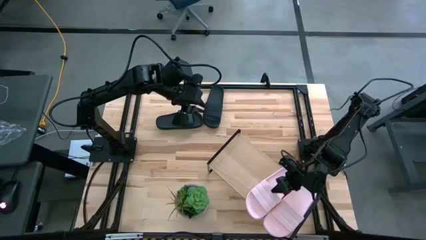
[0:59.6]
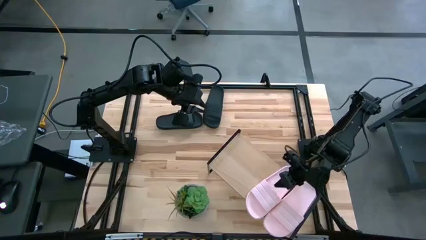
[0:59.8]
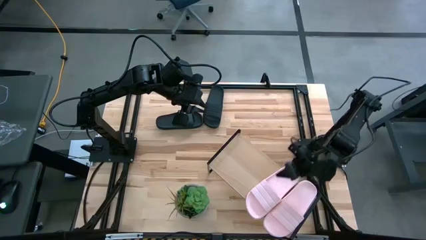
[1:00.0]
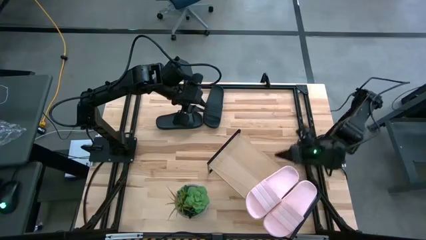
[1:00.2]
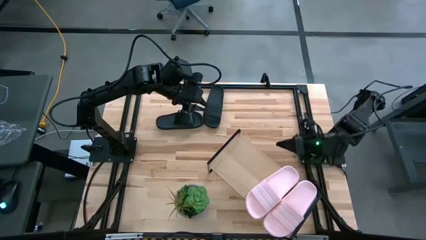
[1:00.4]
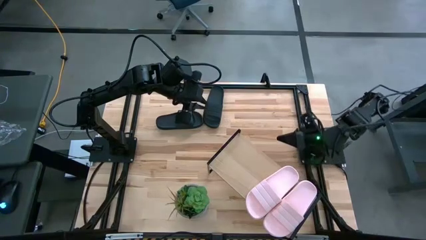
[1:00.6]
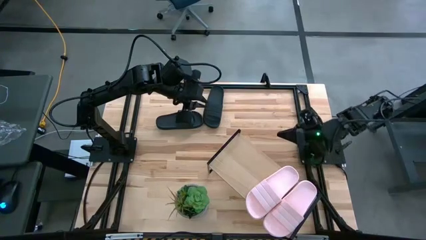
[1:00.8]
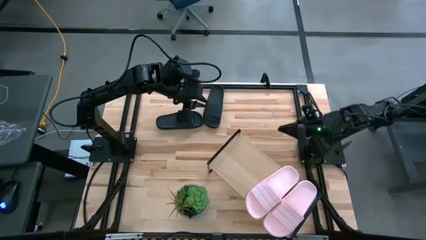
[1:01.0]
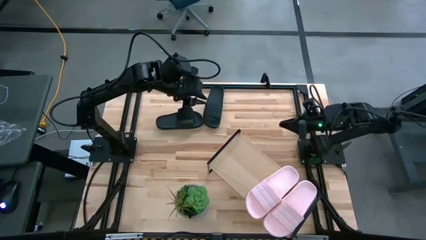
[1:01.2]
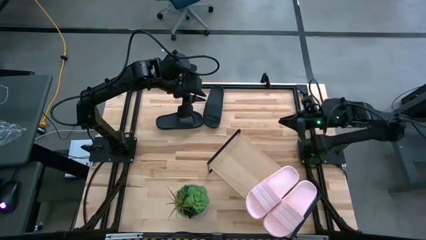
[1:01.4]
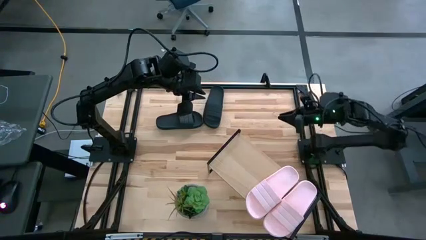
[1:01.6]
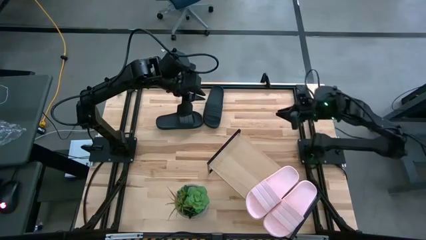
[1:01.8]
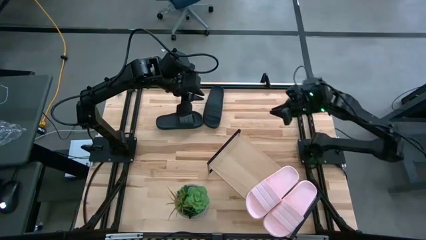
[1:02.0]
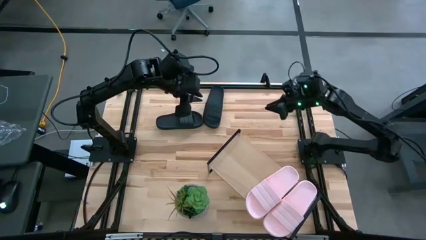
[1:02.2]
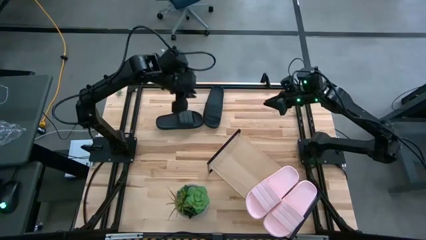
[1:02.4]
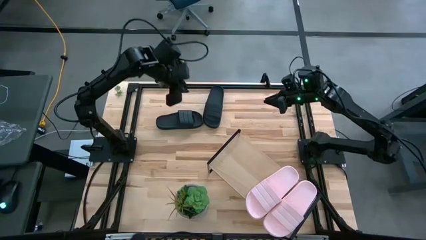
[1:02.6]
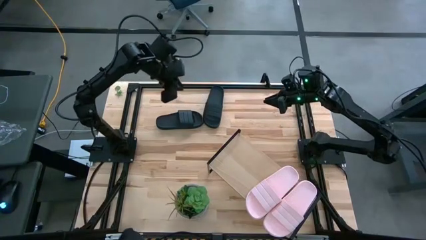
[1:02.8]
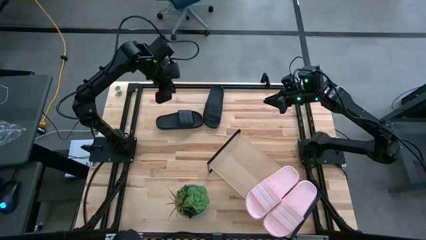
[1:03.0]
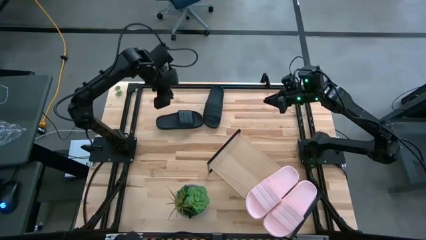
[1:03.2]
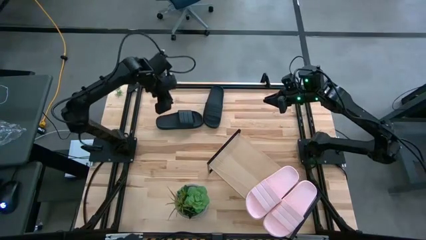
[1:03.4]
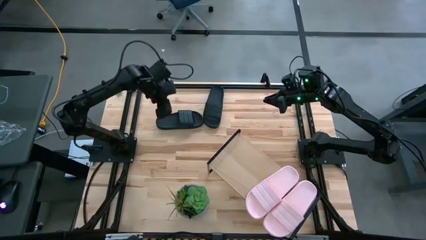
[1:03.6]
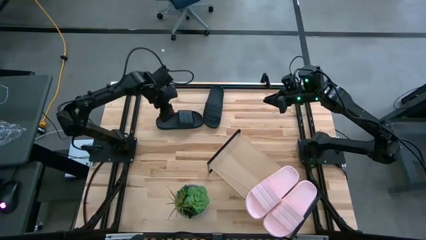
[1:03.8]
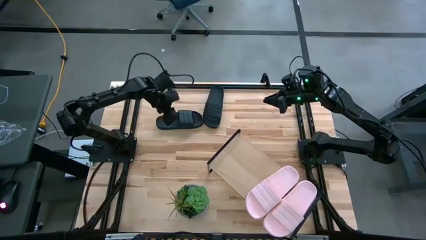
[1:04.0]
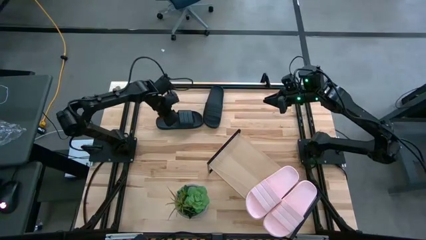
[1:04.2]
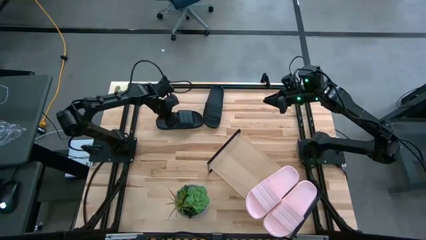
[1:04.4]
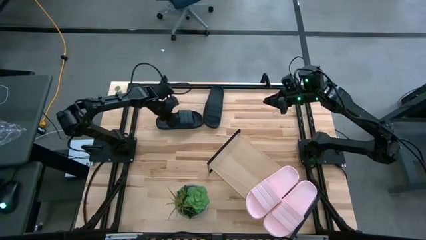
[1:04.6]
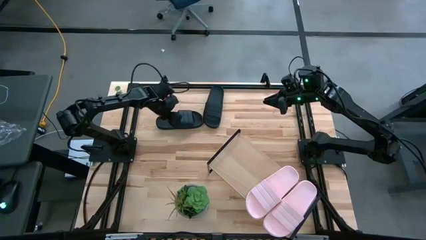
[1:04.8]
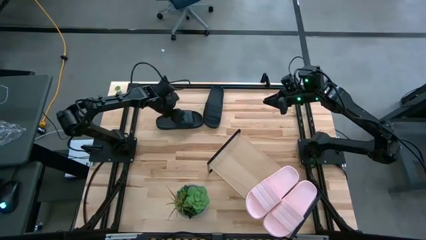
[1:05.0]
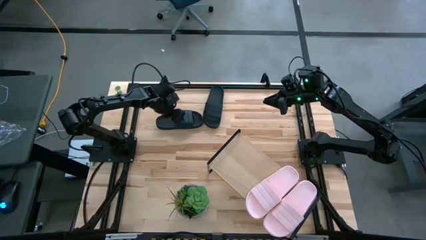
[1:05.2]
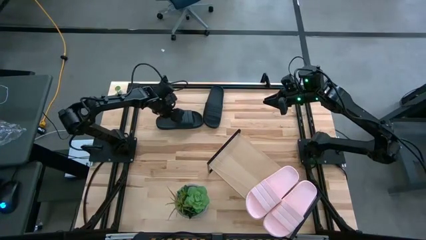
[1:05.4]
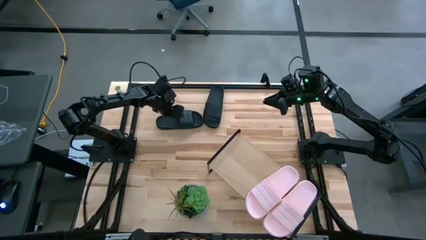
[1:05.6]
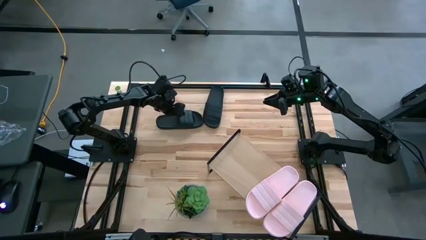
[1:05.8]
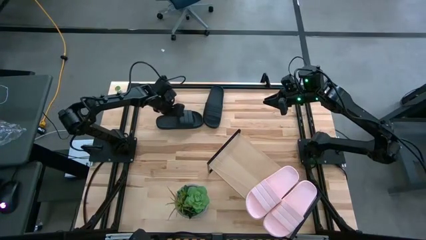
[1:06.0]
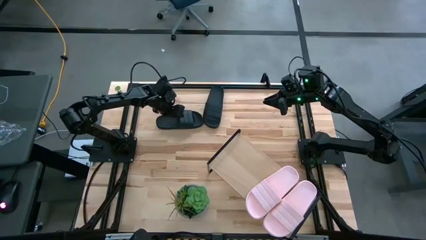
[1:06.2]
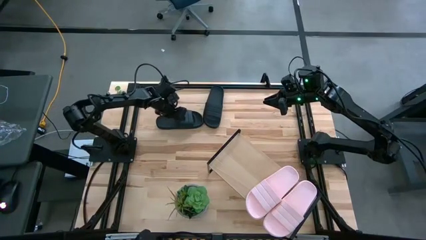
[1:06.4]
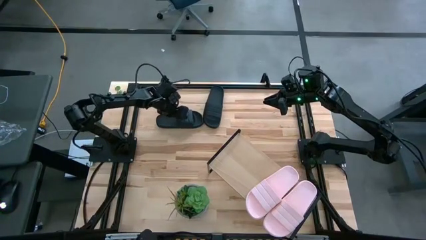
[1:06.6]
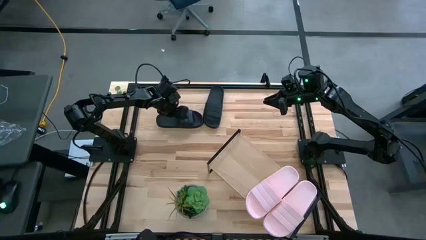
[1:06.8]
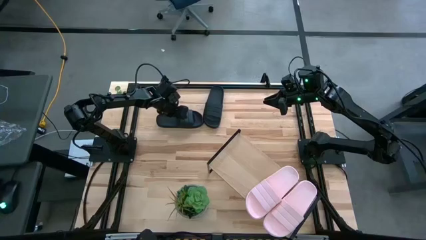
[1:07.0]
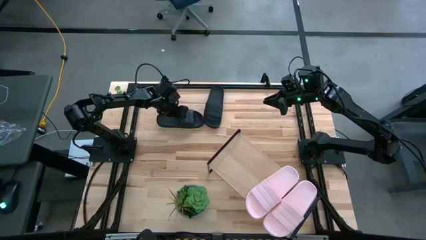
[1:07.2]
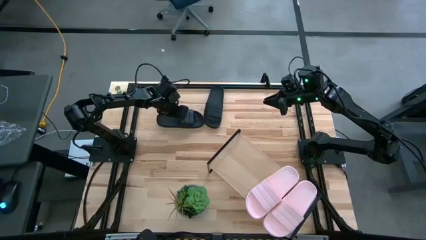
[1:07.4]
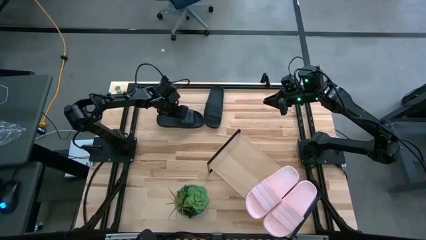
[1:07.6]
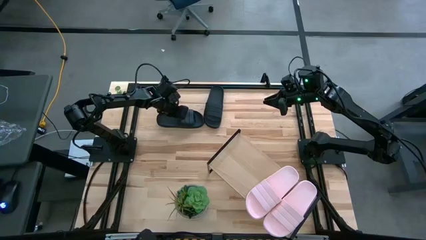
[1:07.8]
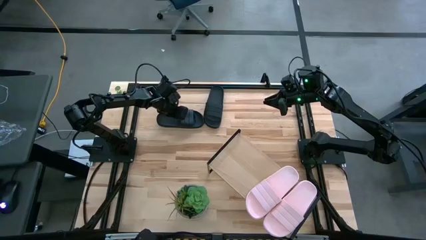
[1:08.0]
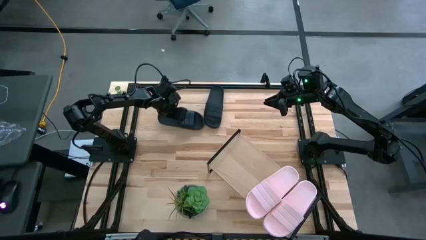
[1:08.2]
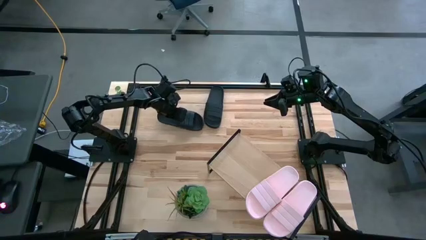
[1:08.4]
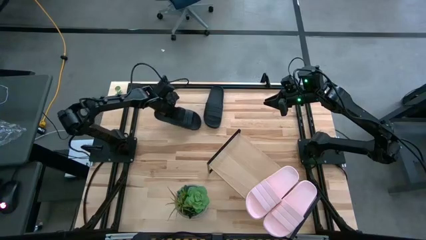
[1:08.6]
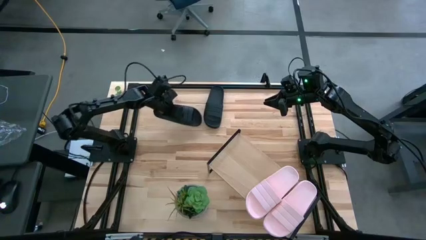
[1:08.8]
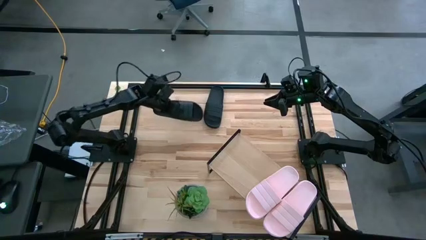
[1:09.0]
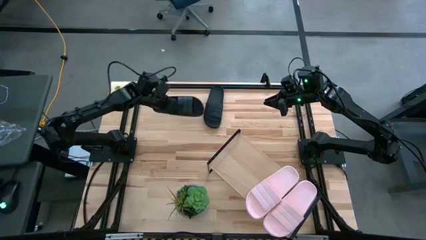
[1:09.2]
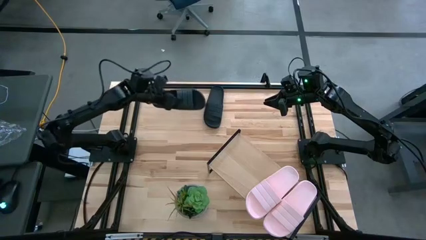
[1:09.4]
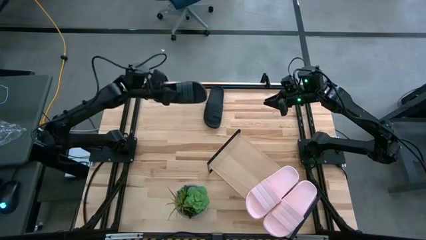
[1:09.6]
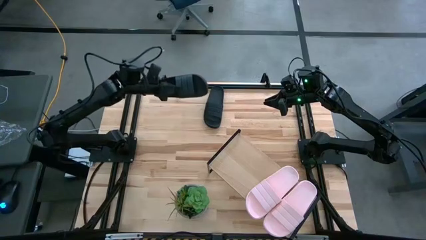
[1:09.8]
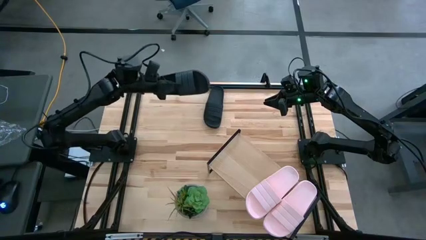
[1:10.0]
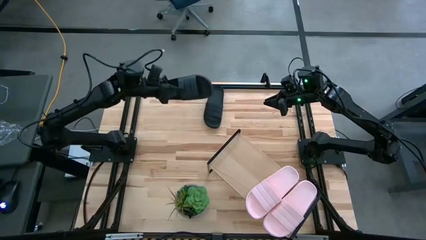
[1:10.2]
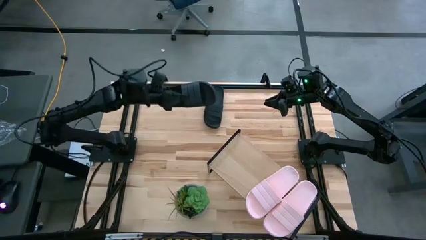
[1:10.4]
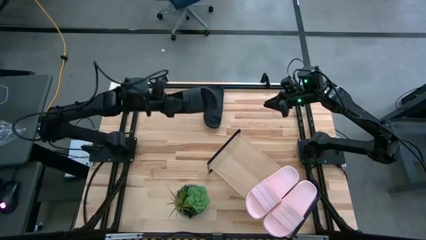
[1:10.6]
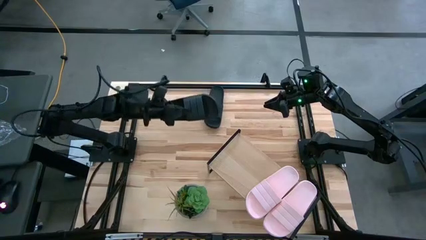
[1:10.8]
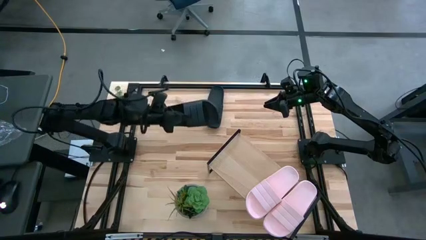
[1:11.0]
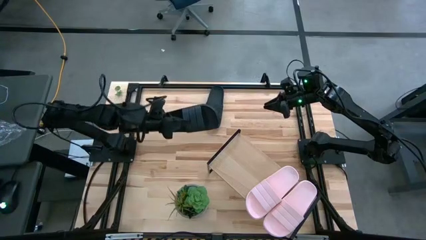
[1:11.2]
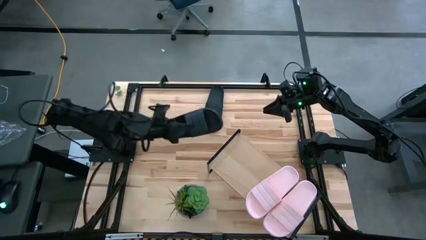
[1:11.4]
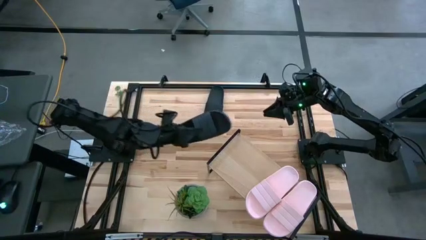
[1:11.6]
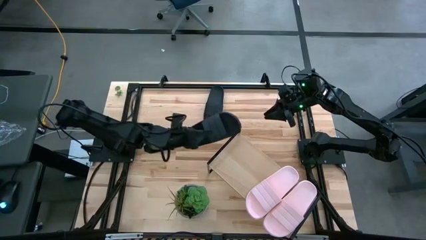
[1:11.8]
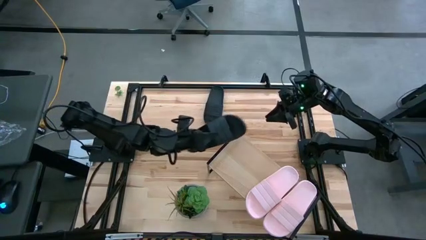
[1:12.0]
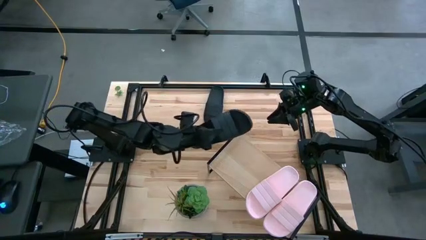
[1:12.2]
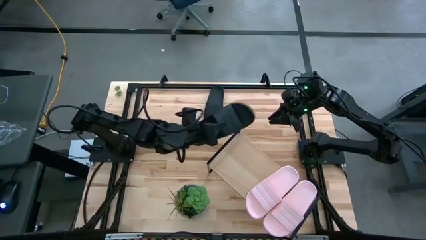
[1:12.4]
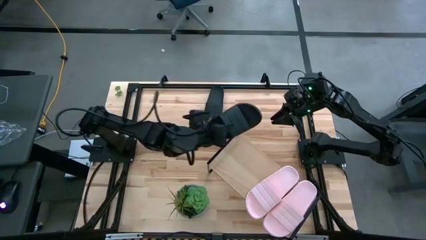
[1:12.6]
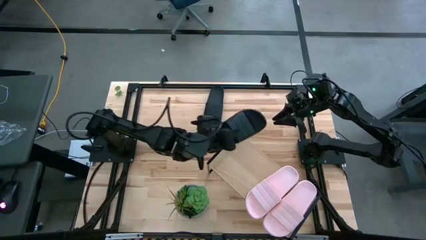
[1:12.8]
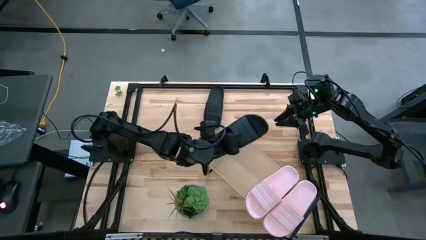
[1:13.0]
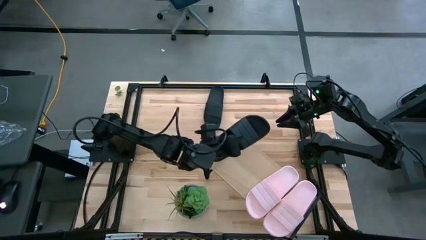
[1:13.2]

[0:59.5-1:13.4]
Task: Pick and place slides into the shelf
Put the left black slides on the shelf
